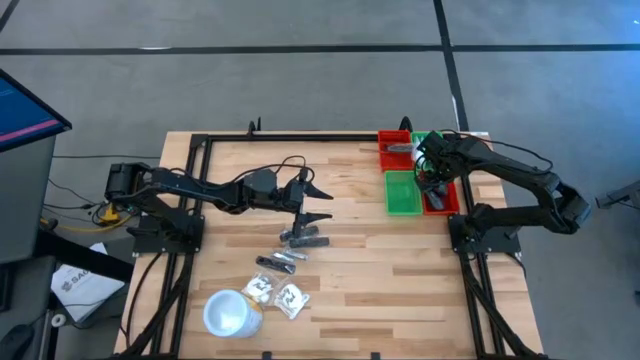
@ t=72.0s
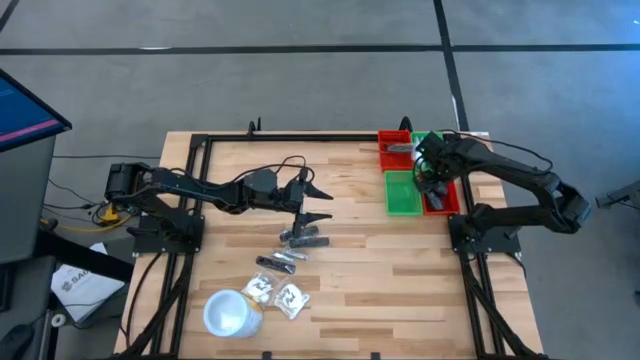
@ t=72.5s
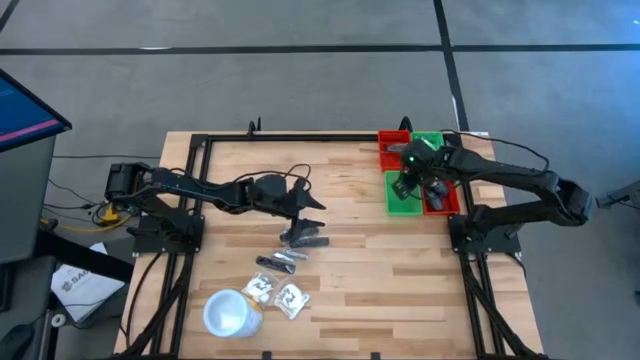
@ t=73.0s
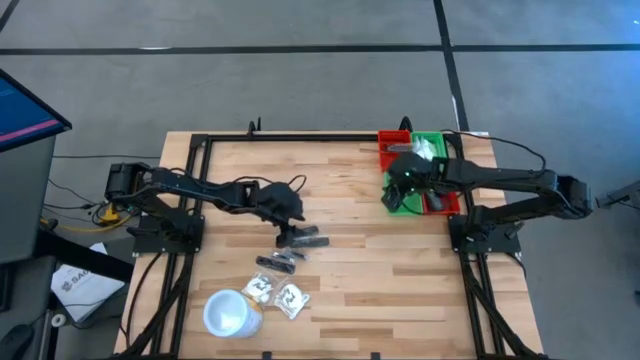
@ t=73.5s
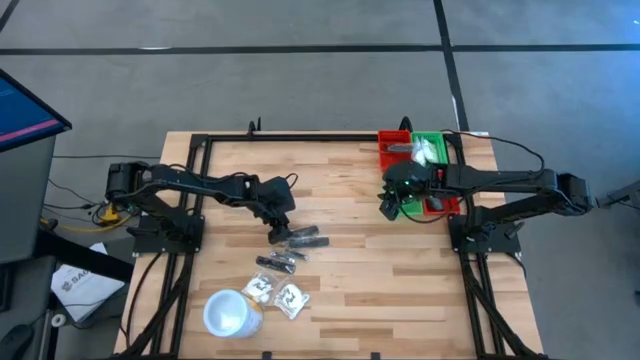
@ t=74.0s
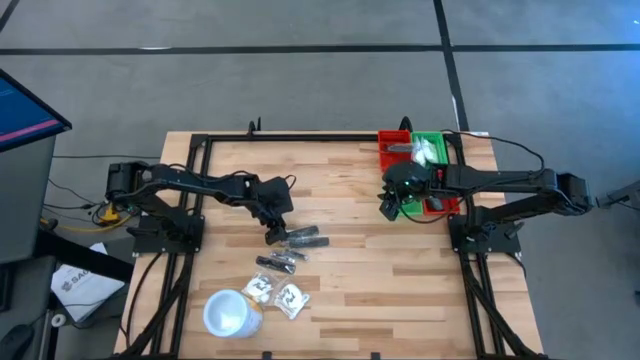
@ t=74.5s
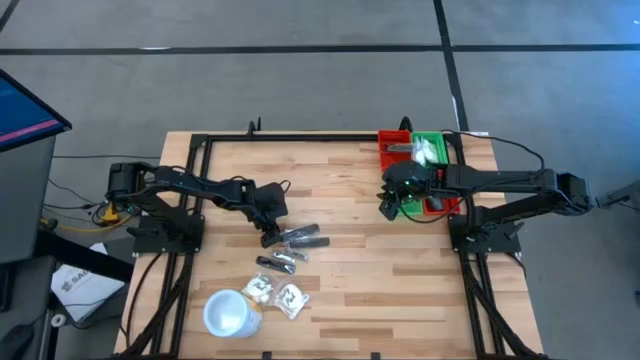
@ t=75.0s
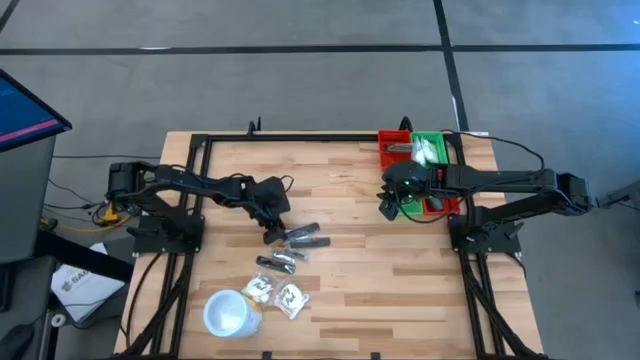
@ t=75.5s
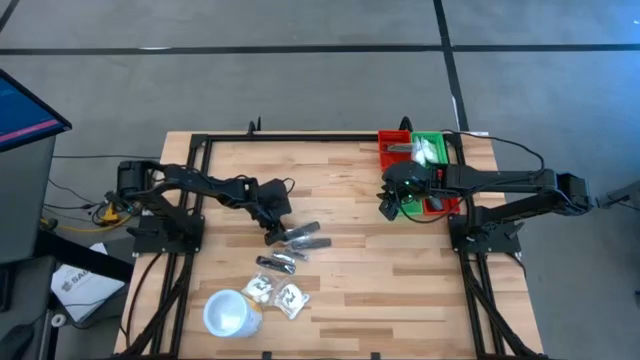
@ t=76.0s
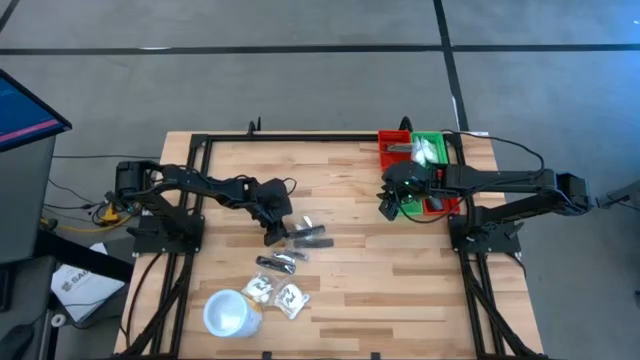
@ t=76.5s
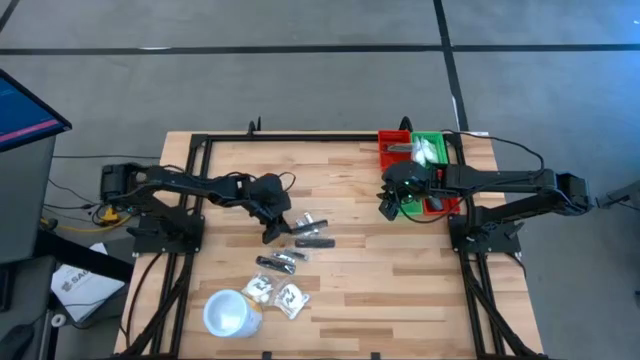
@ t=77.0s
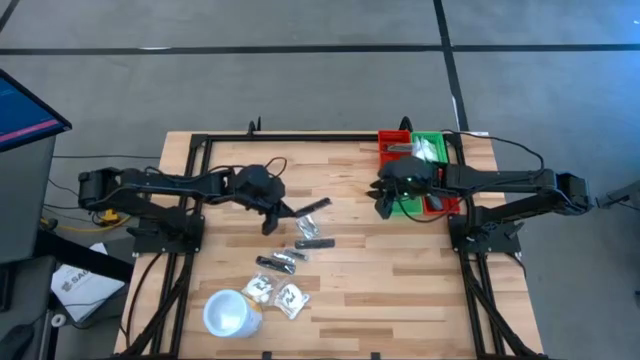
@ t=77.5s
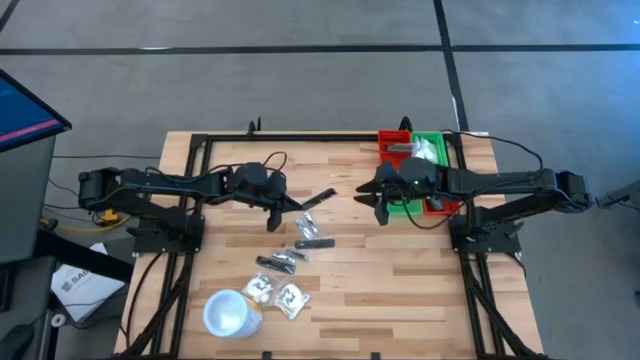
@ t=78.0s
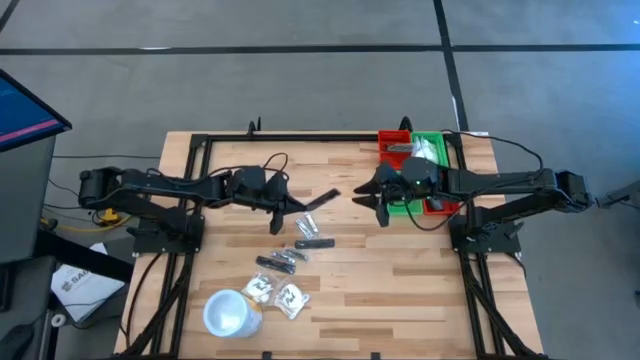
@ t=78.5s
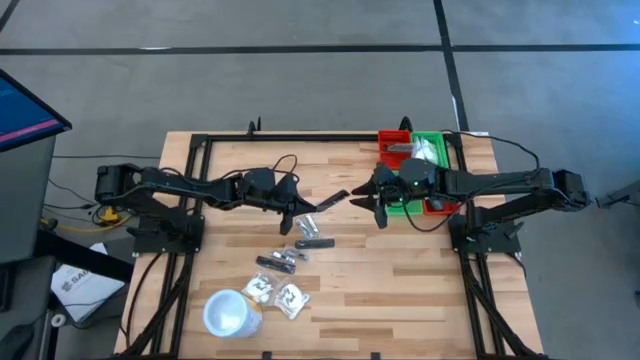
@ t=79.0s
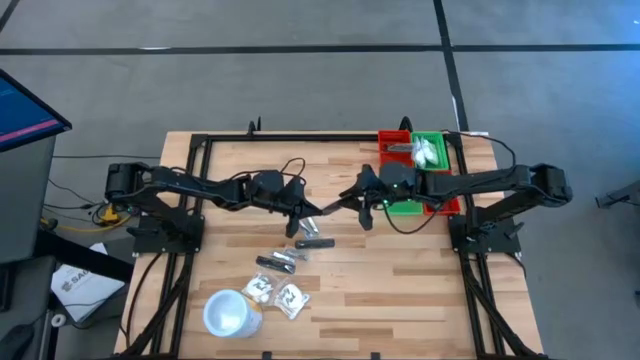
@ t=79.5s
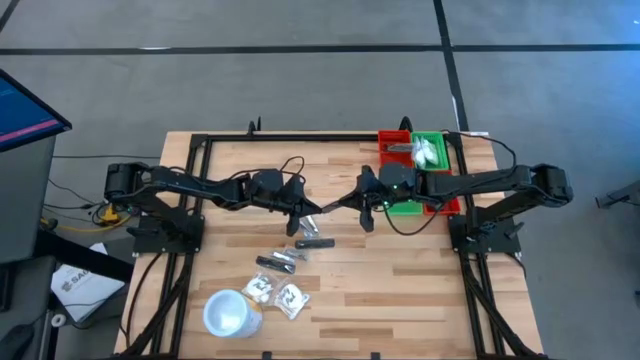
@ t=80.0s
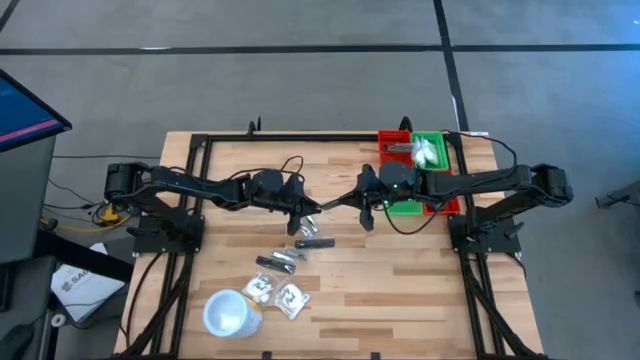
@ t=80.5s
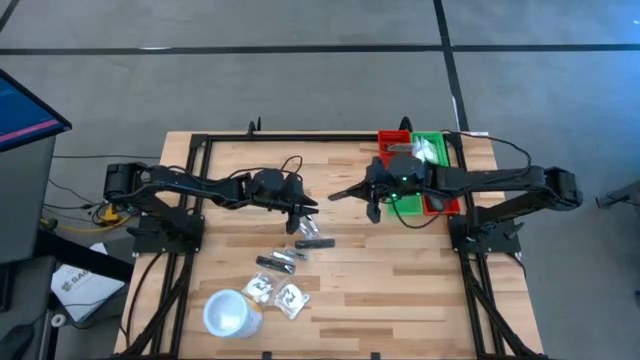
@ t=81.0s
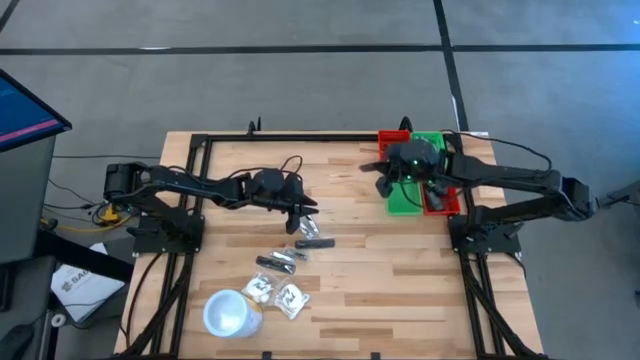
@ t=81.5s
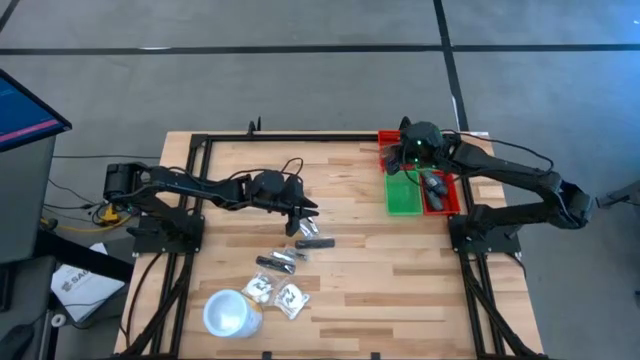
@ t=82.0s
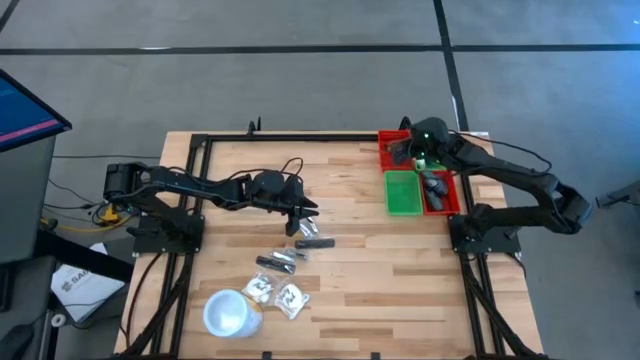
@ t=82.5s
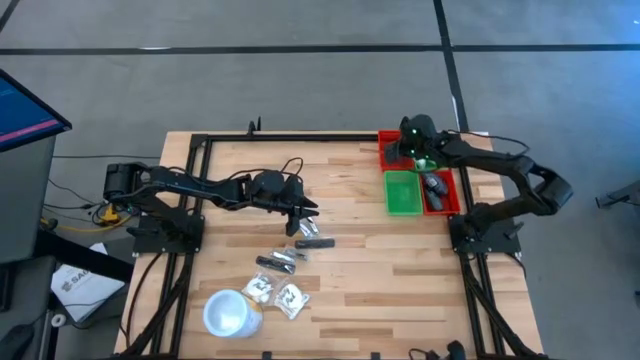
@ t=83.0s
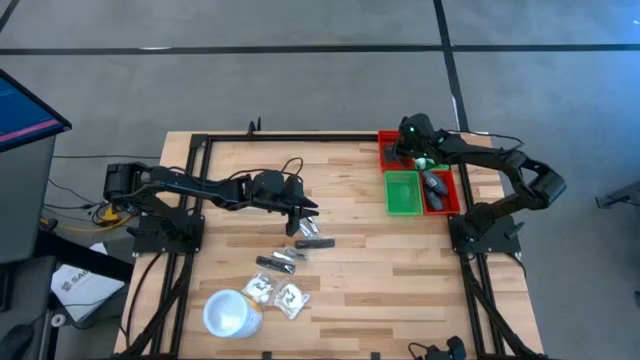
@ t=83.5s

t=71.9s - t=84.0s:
Task: Pick & Place Travel size toiletries
Put the black hair comb into the top red bin

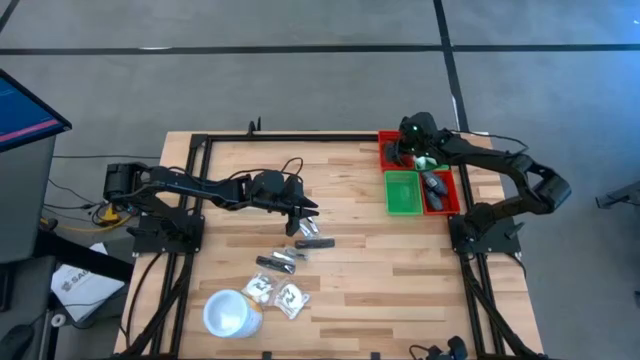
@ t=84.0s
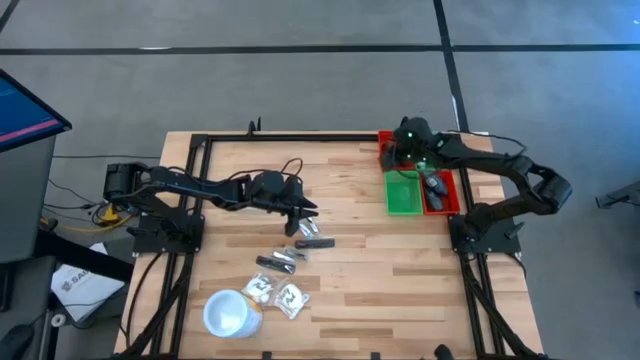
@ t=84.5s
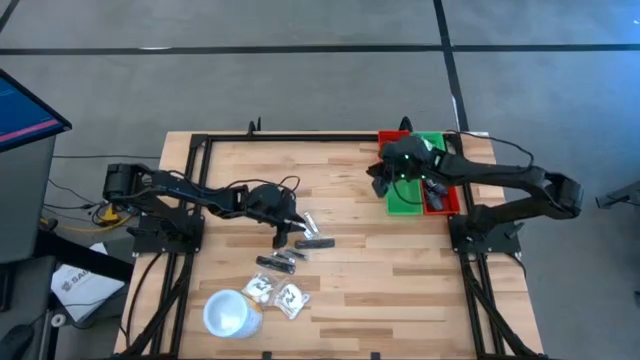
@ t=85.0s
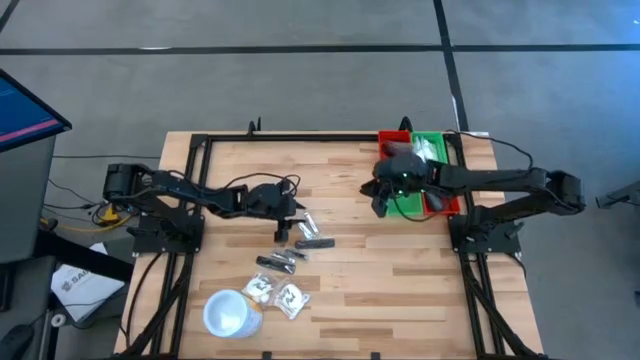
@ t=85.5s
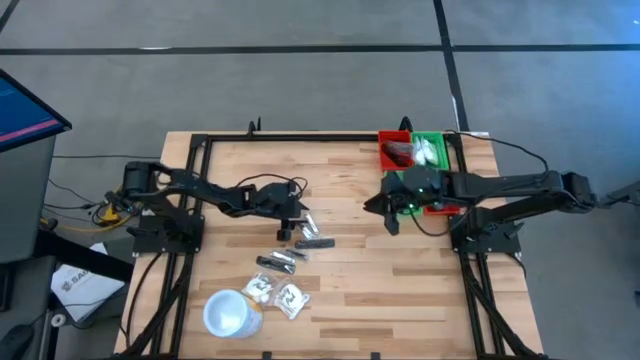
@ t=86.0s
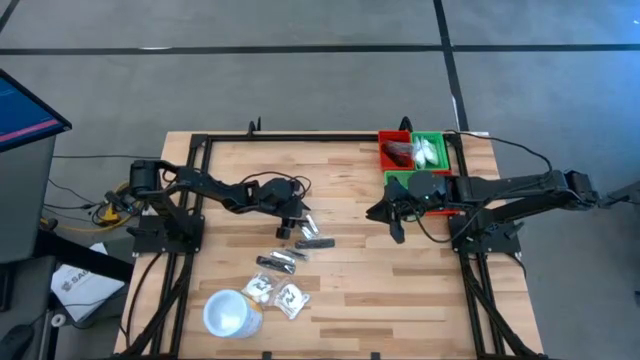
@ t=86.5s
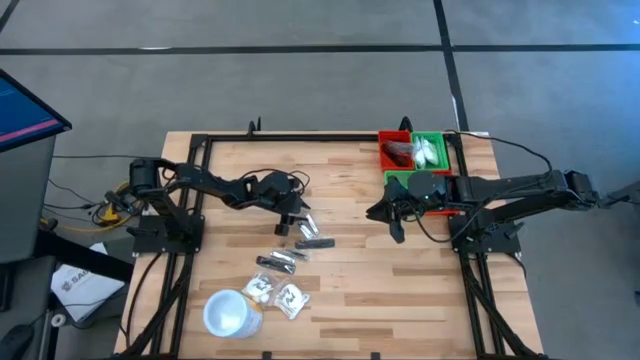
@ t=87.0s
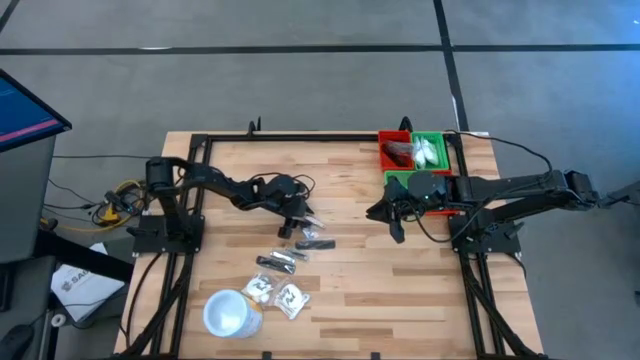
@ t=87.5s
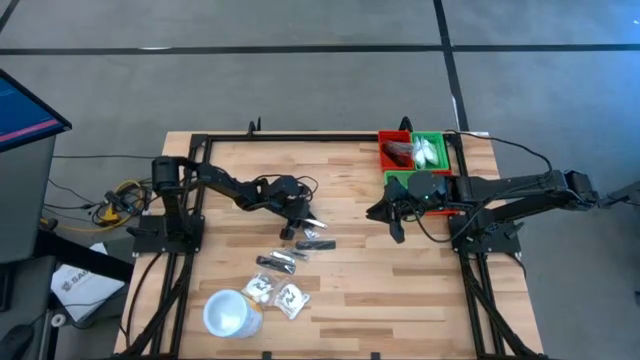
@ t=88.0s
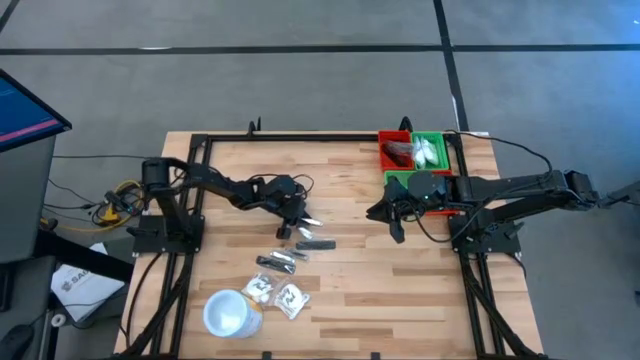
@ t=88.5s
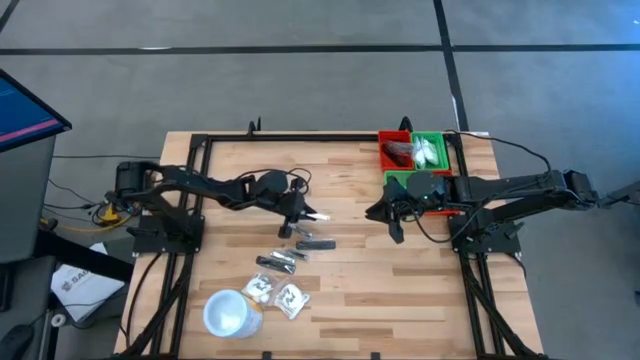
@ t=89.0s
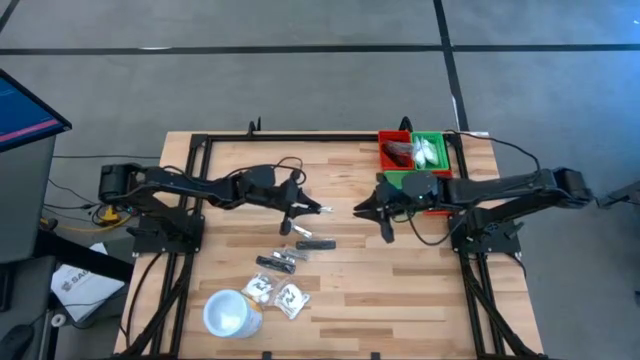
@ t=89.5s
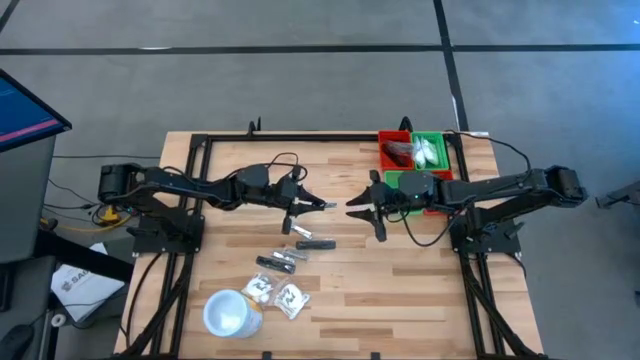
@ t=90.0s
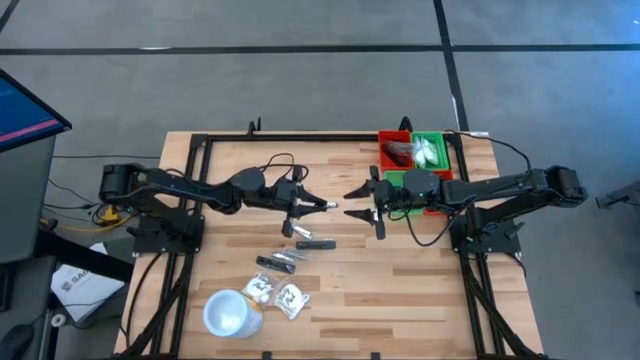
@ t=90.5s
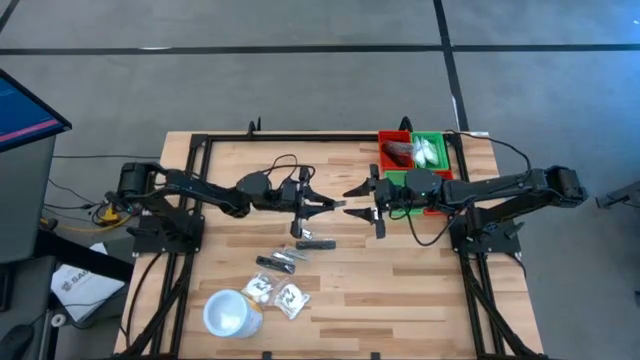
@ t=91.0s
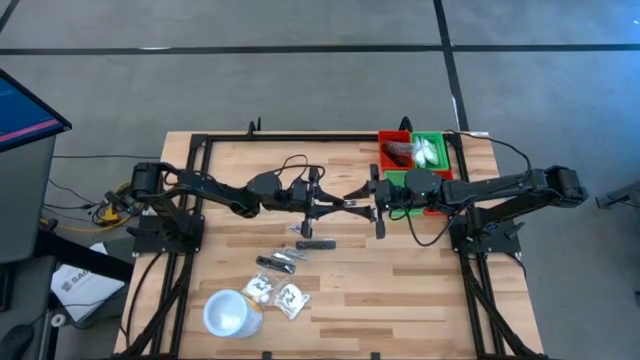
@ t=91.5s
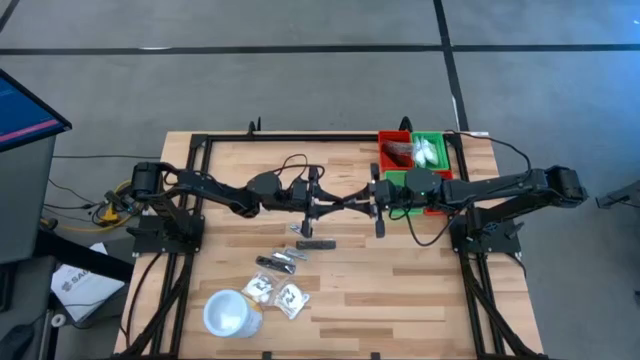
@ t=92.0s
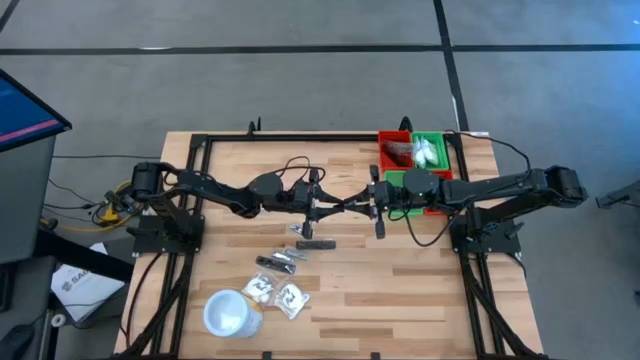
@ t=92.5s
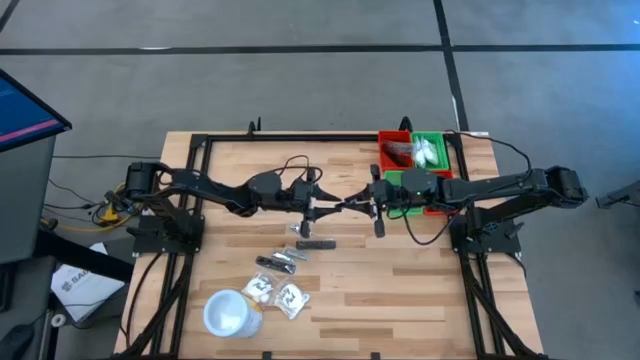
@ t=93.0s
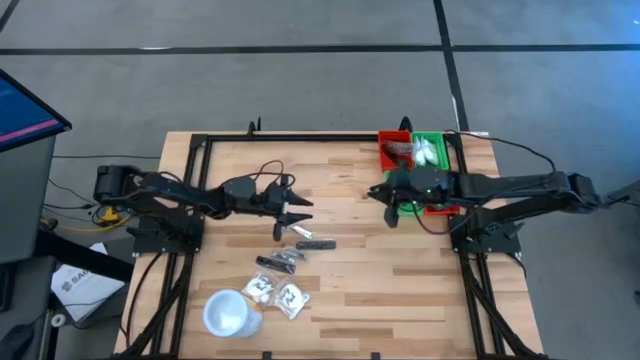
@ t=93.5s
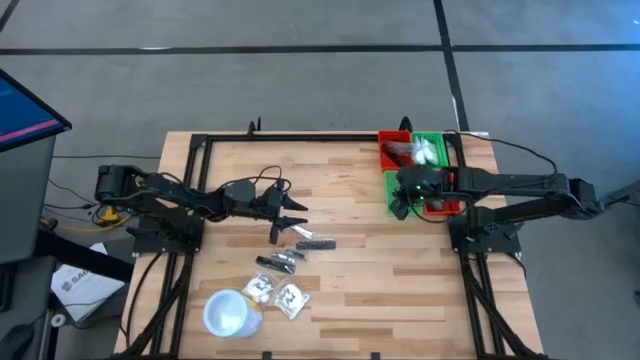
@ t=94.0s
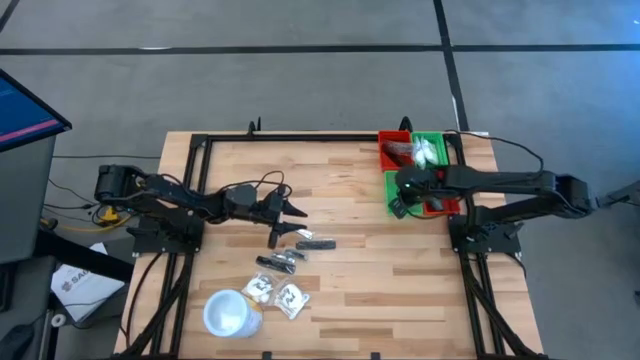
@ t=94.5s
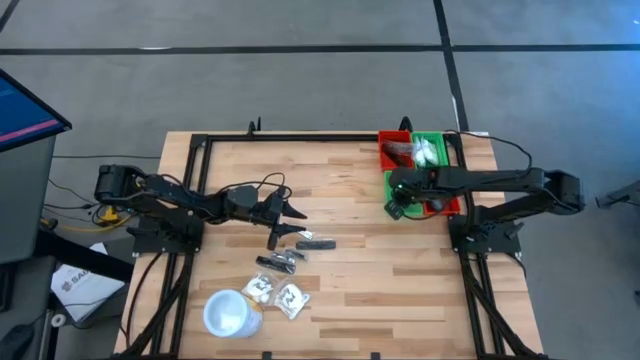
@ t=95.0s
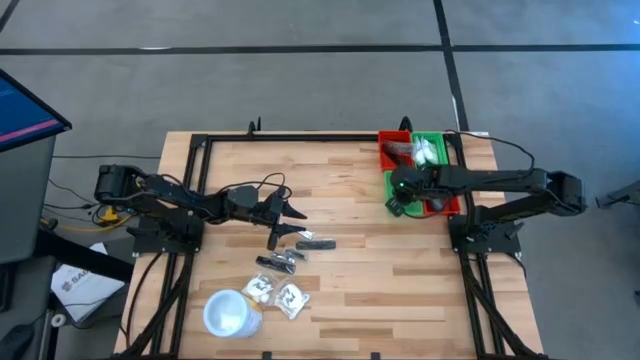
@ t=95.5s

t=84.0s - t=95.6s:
Put the silver nail cutter into the bottom green bin
